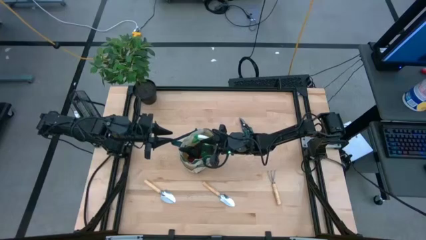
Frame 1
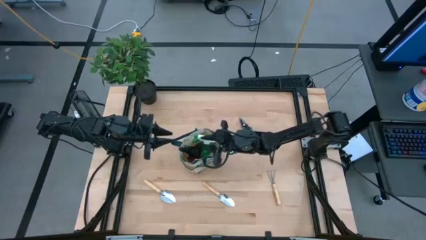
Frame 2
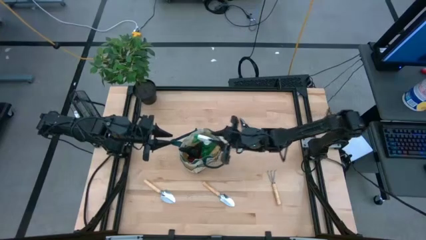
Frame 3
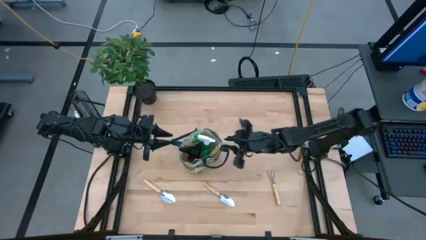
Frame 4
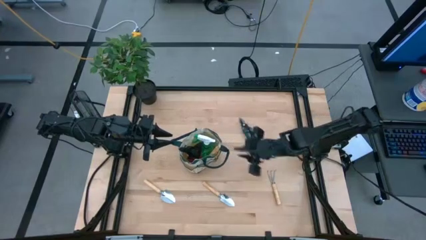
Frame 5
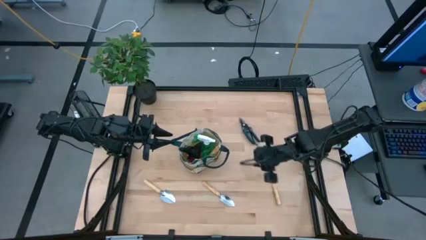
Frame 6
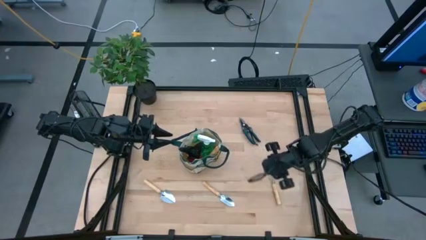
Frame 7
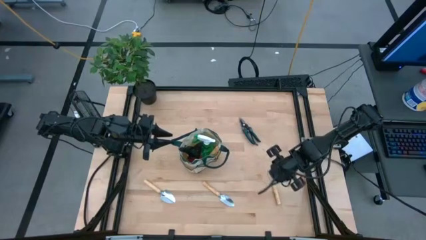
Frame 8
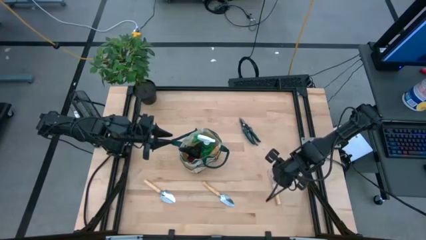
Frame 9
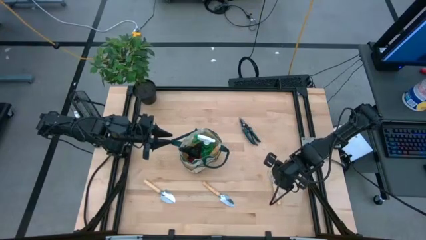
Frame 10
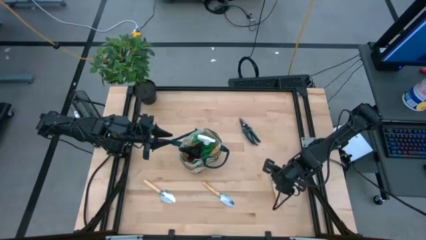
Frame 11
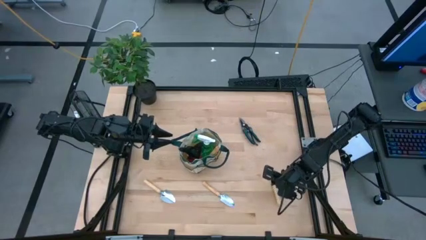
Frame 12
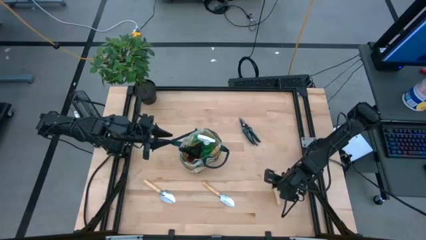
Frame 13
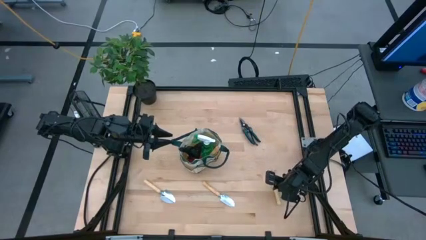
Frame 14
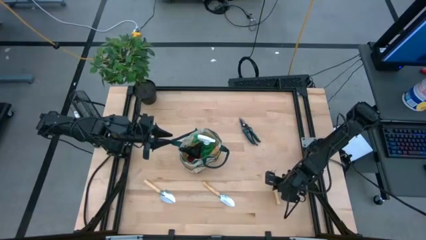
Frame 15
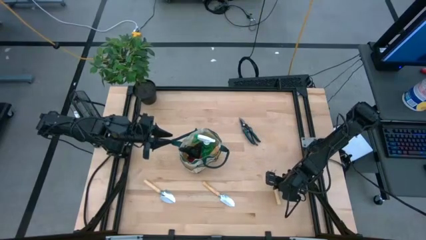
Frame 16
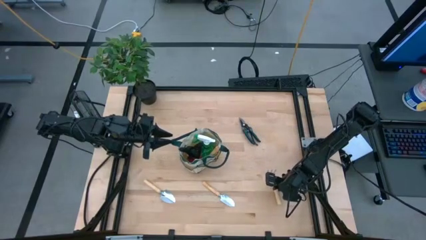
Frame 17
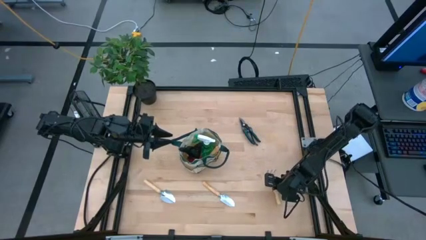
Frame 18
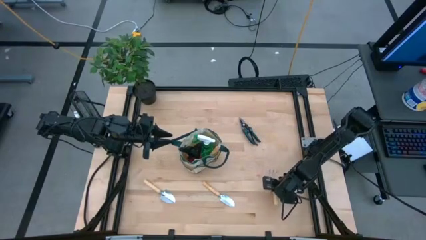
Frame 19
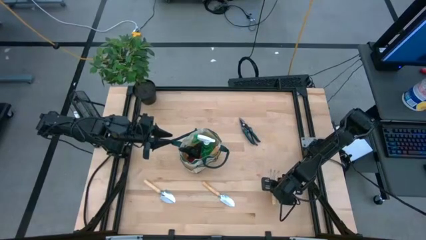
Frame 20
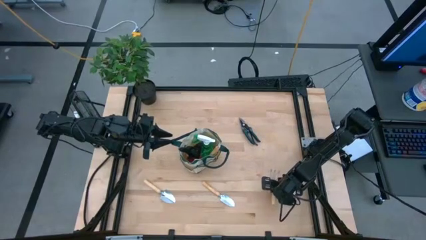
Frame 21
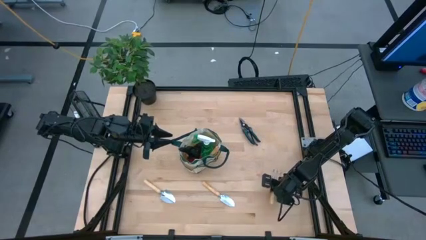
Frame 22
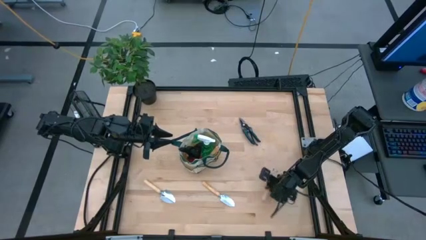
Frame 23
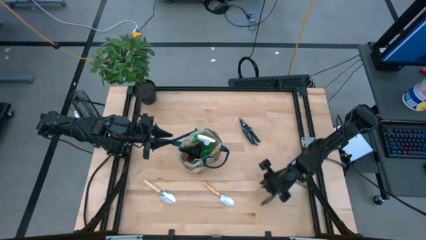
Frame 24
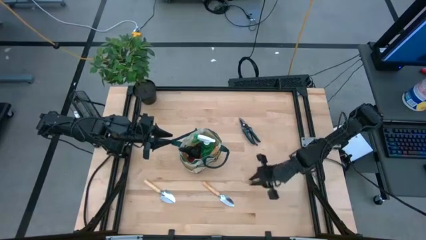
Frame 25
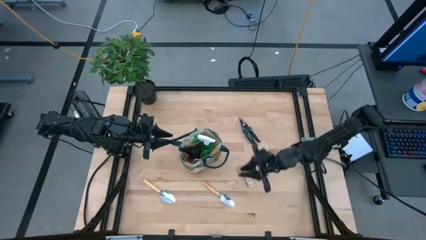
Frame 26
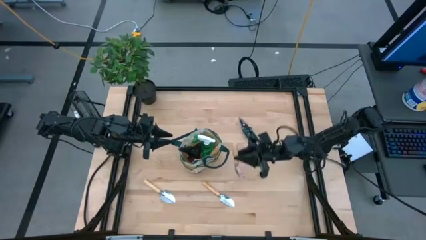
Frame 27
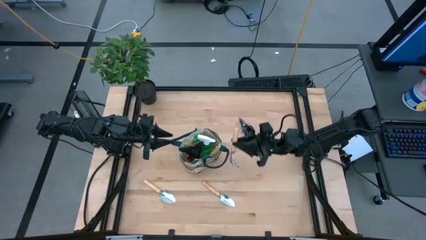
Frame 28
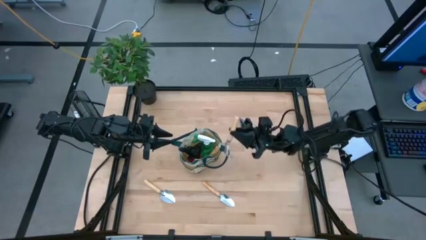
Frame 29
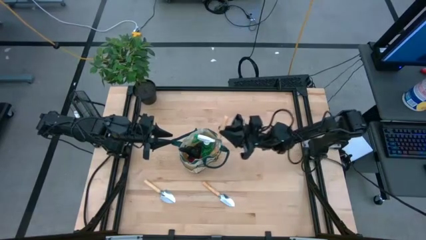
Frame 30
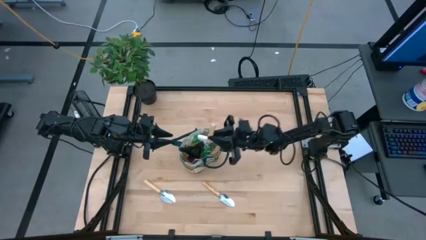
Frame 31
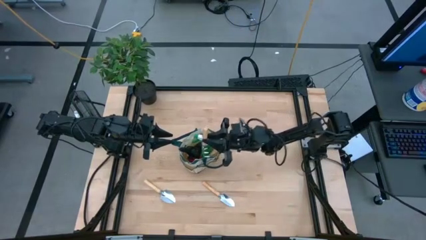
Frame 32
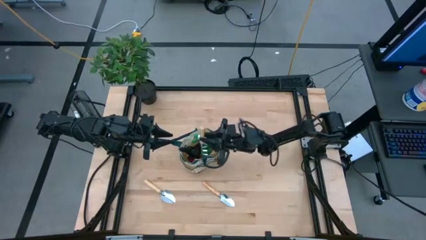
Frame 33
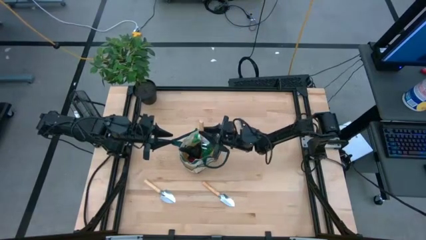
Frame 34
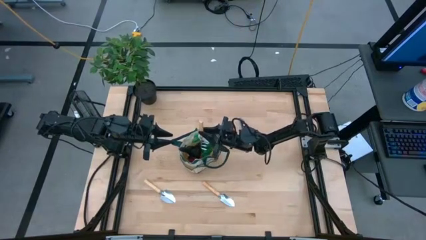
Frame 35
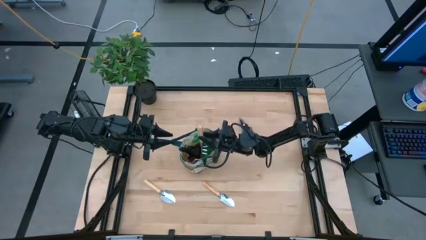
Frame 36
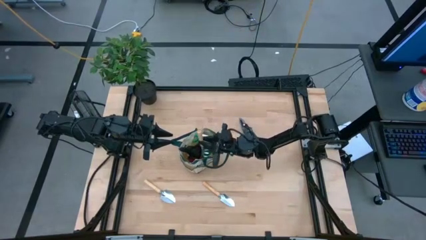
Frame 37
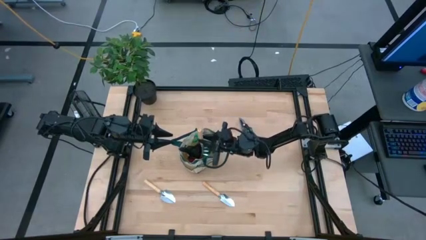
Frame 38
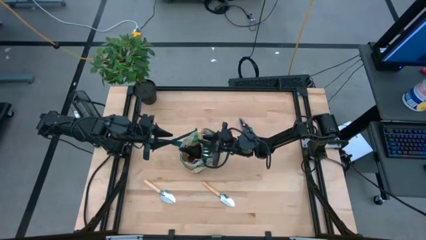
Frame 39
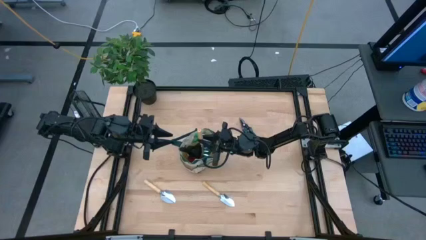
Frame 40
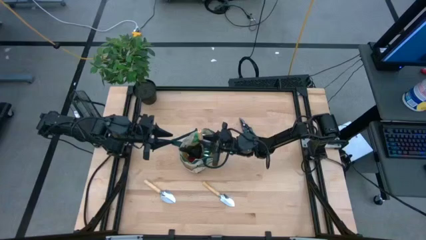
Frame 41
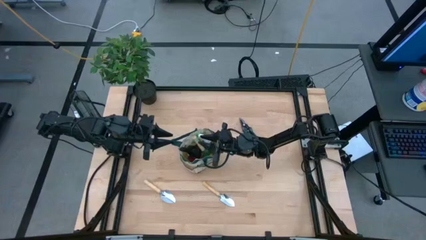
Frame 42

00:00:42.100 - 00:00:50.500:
Task: Pick & Place Garden tools in Gardening bag
Put the brown hand rake into the gardening bag

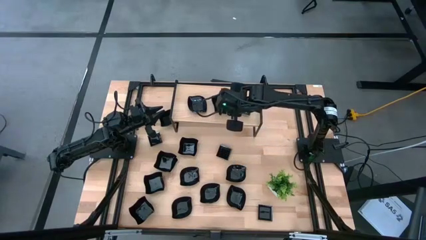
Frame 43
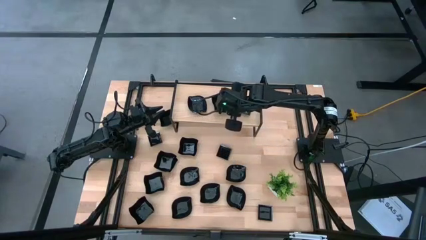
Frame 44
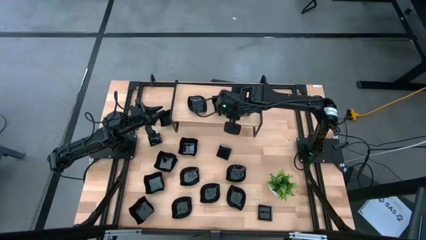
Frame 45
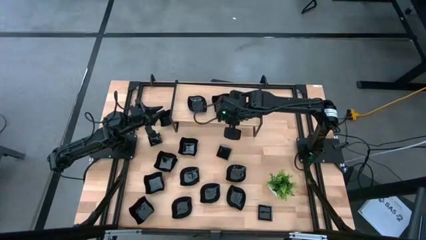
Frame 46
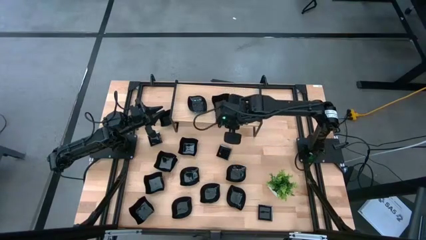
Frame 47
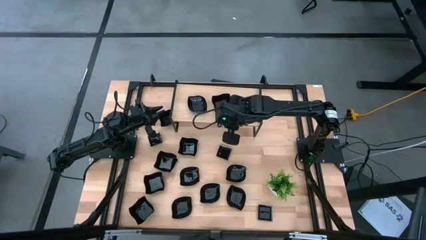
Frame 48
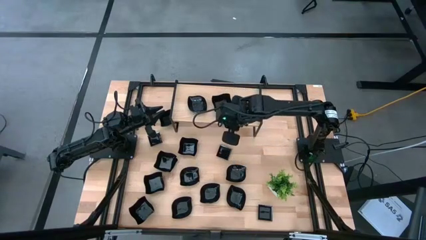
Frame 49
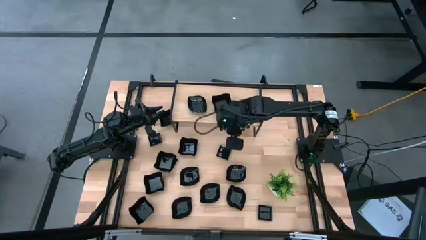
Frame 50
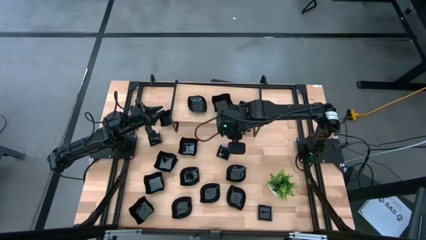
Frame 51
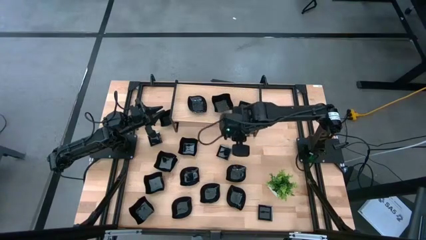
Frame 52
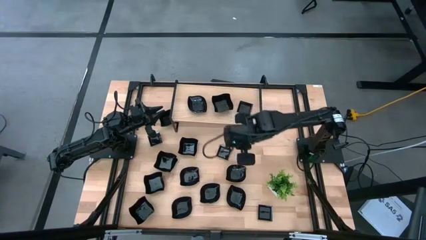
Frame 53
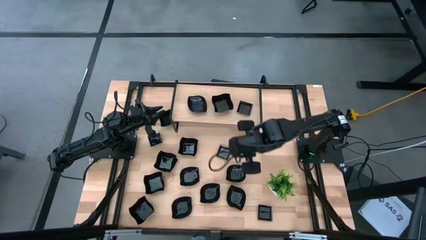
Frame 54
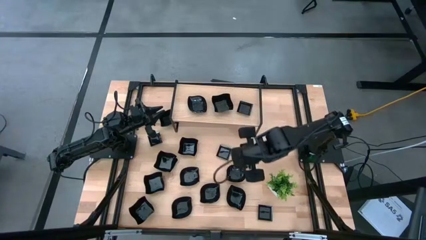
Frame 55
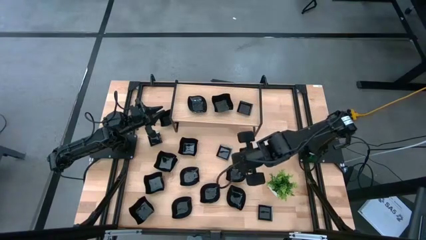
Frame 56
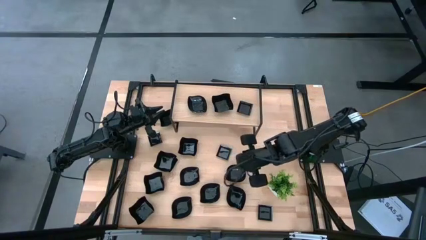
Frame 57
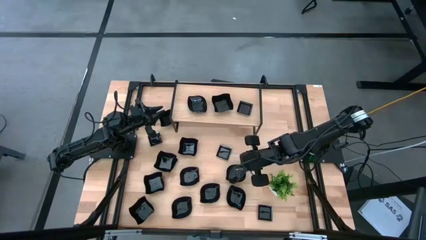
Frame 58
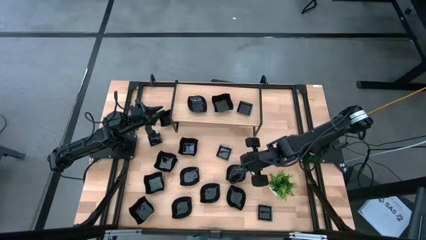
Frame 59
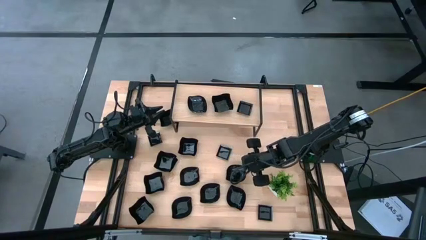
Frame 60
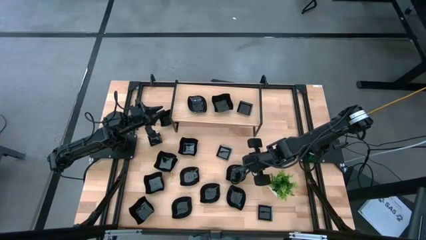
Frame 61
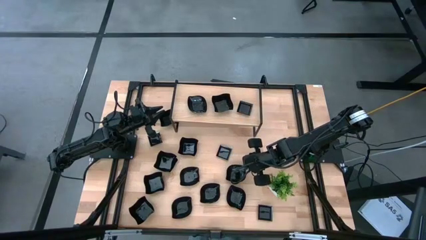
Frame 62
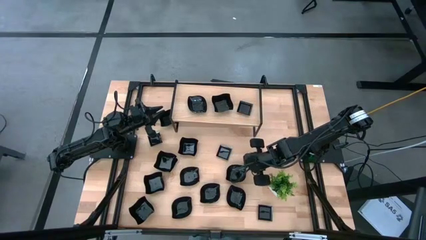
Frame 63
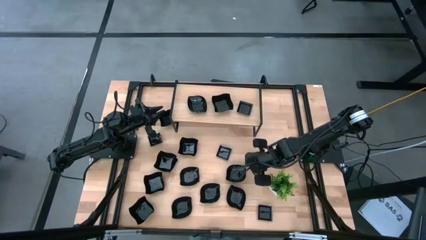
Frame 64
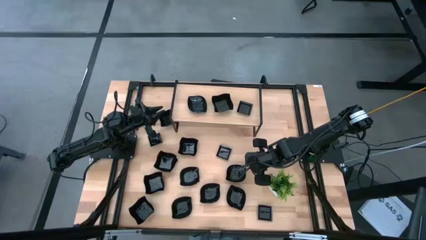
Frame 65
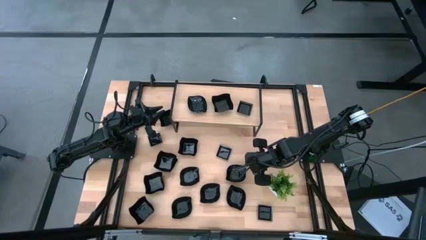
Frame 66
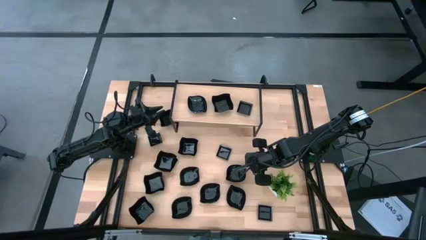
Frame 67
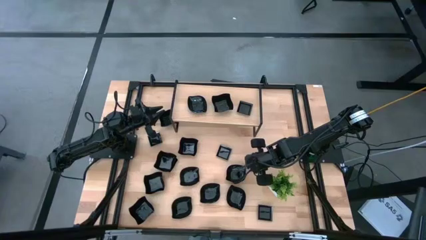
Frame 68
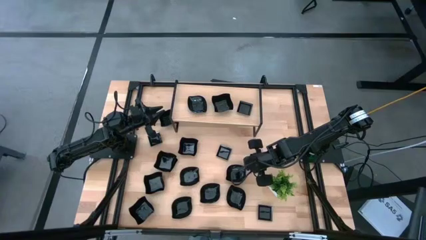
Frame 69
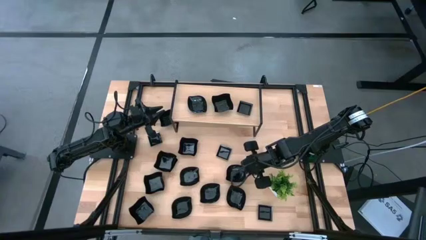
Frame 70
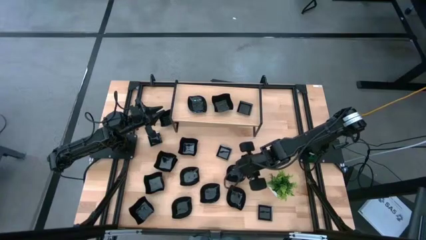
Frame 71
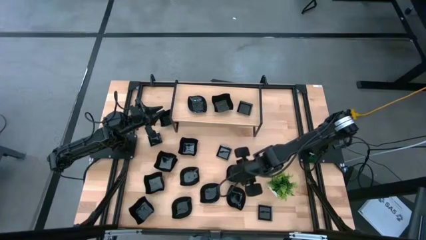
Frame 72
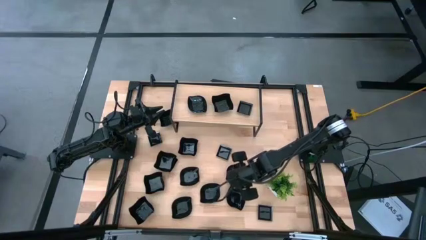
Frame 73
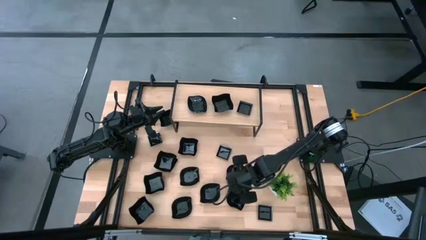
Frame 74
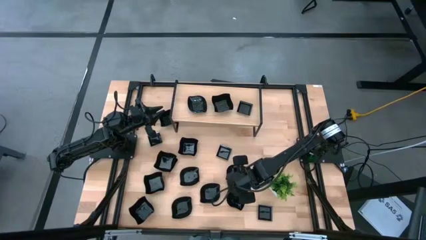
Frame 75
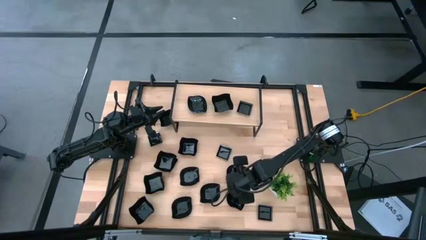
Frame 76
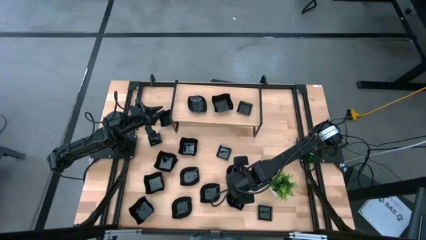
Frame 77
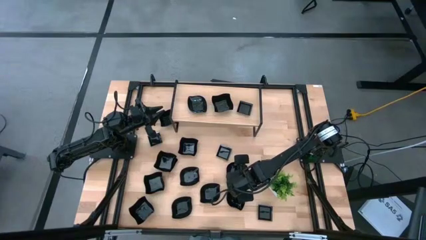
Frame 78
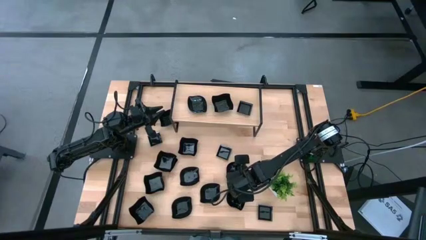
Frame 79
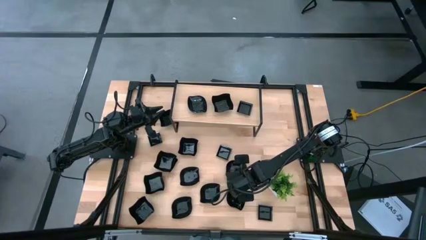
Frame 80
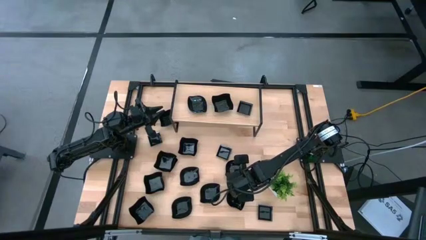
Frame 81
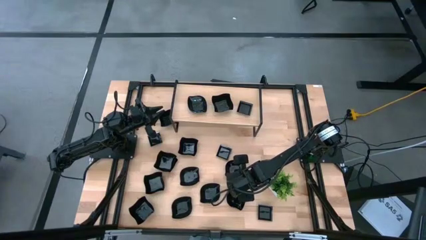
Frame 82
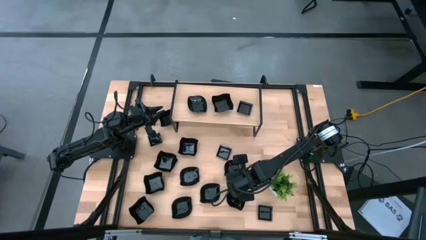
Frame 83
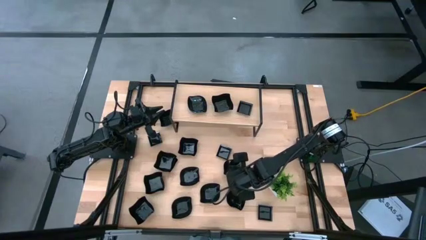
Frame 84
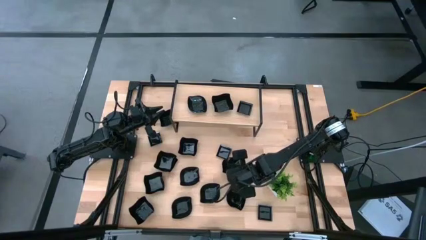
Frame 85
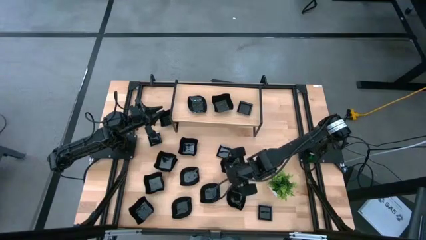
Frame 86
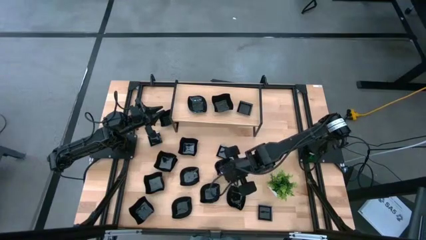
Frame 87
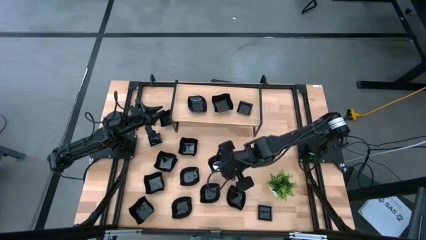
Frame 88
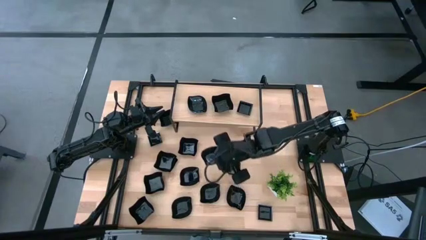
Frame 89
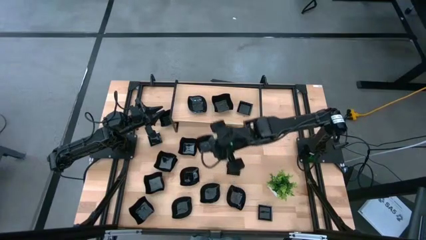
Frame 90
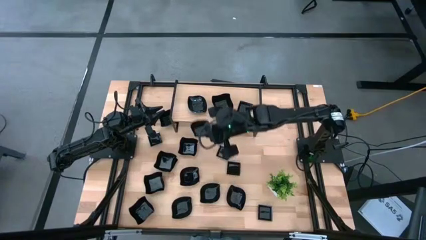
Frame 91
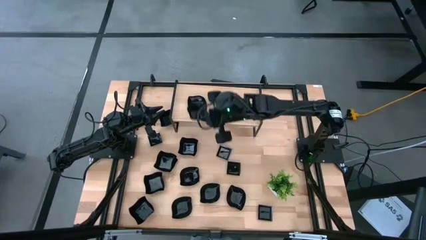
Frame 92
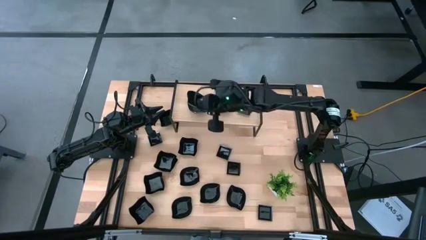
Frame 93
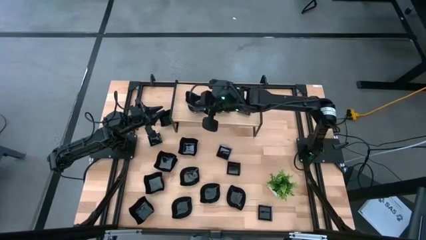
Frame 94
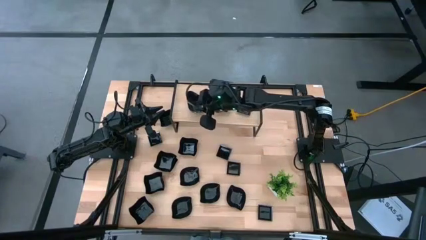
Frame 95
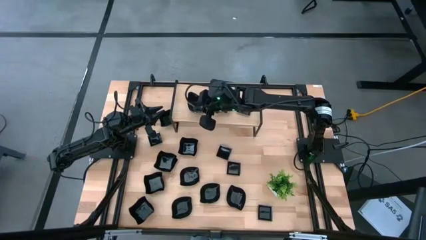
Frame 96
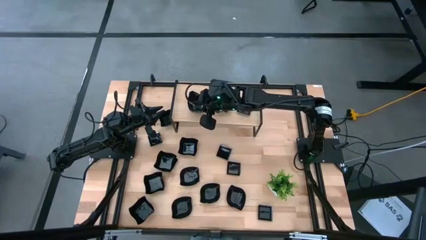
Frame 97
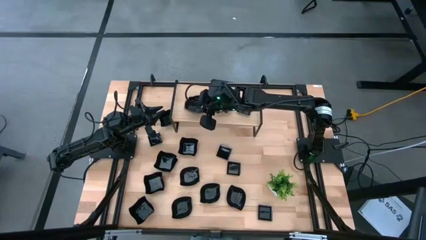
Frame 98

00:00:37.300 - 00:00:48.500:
Task: Pick & Place Mini shaped plates
Stack the leaf-shaped plate on top of the leaf-shaped plate on the shelf
